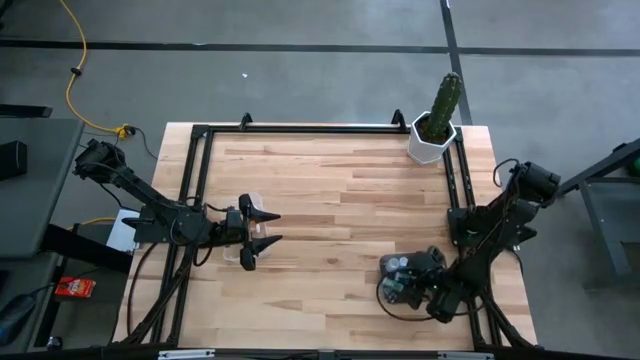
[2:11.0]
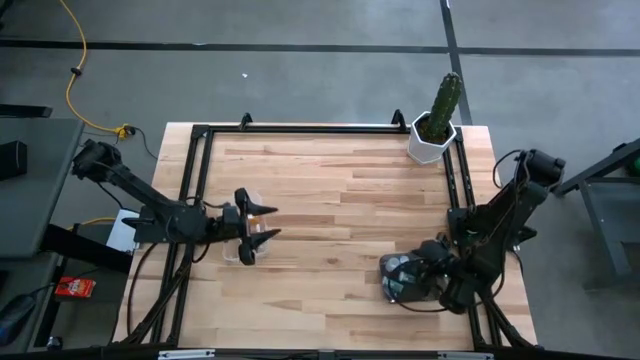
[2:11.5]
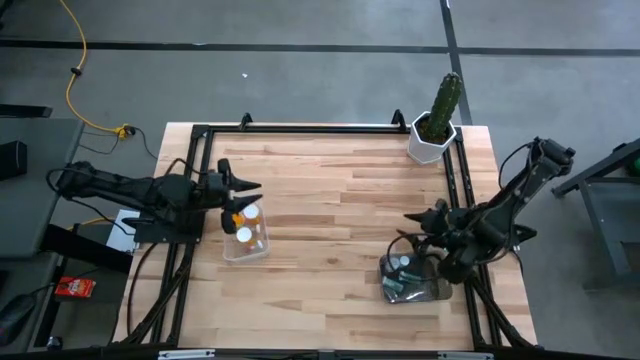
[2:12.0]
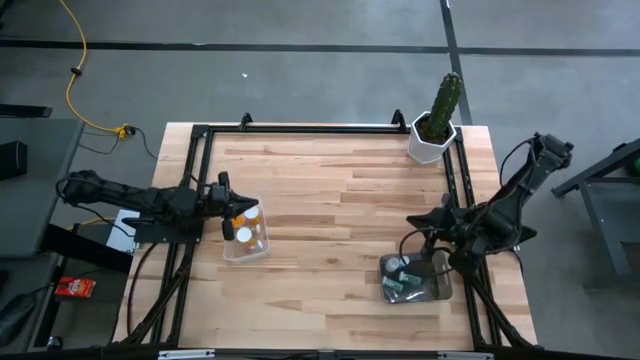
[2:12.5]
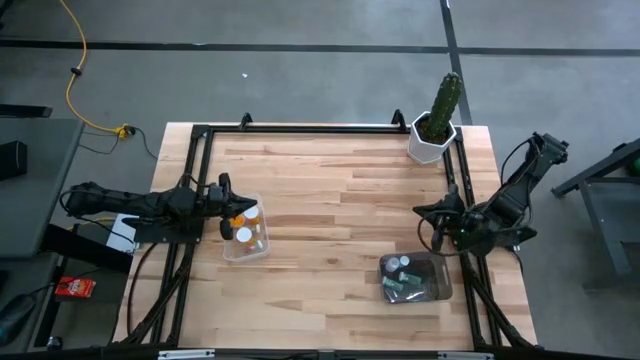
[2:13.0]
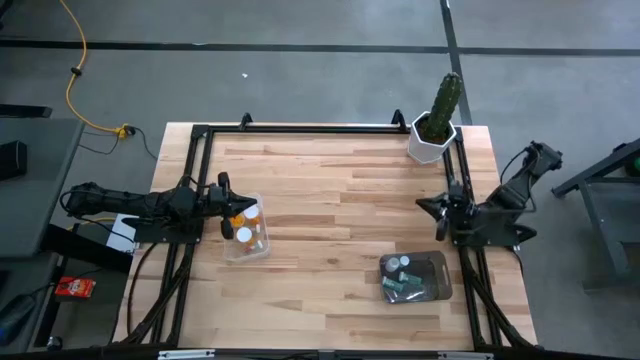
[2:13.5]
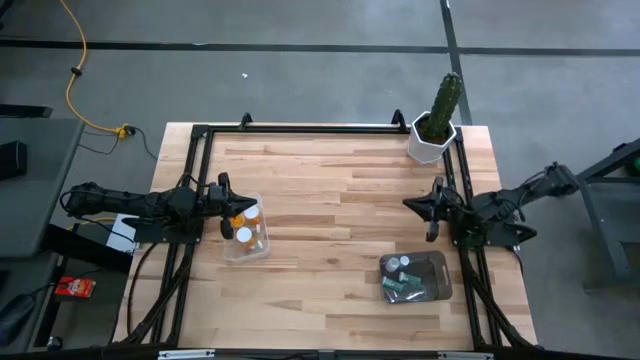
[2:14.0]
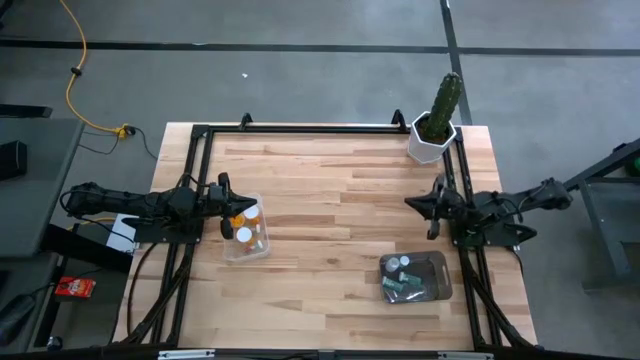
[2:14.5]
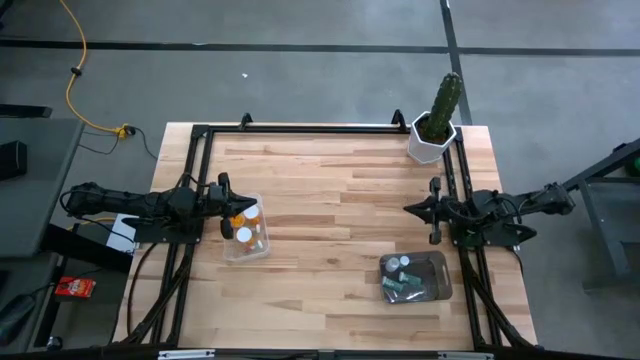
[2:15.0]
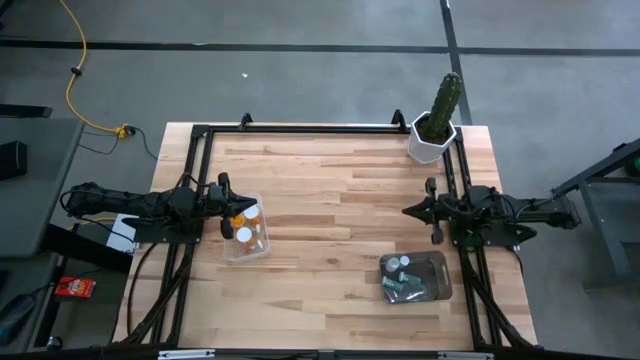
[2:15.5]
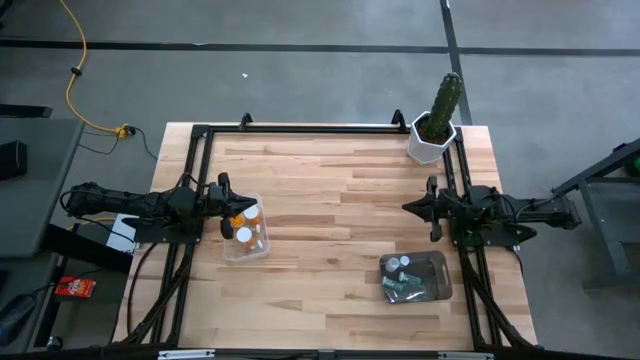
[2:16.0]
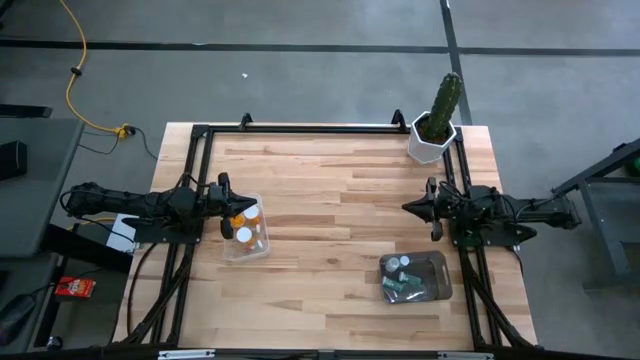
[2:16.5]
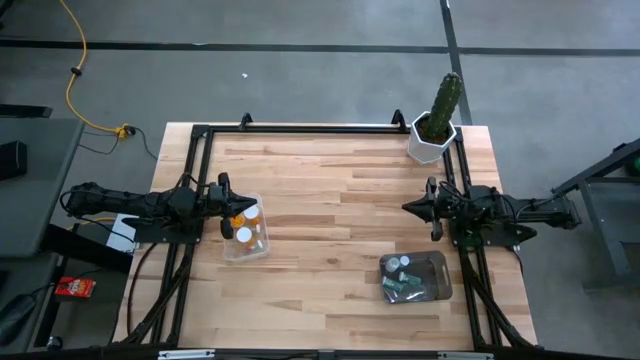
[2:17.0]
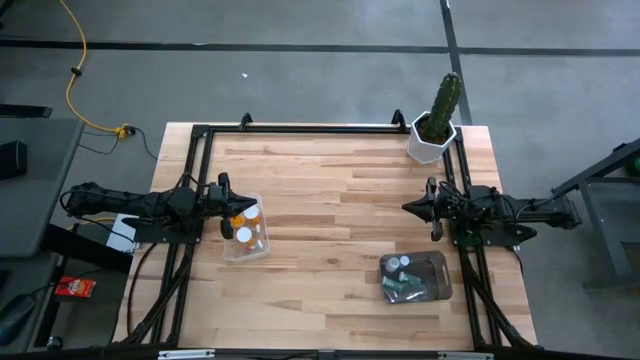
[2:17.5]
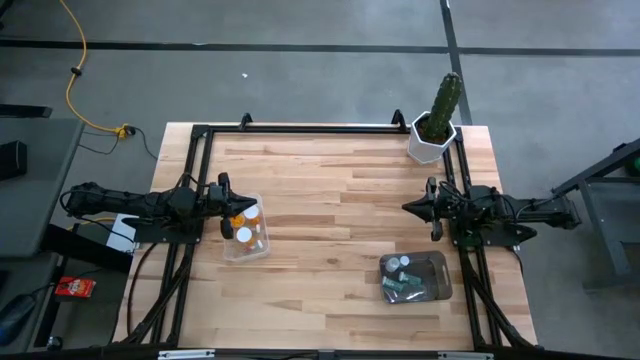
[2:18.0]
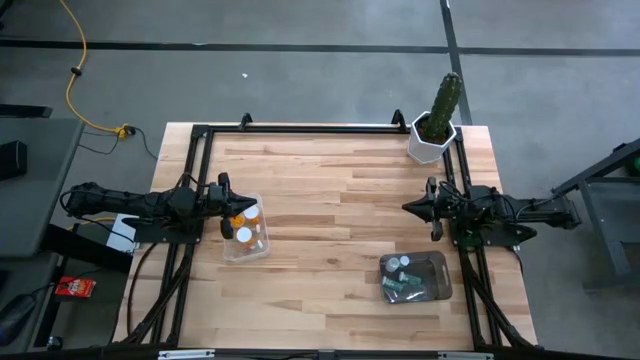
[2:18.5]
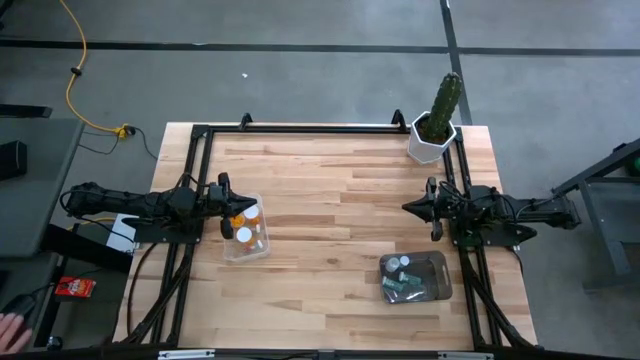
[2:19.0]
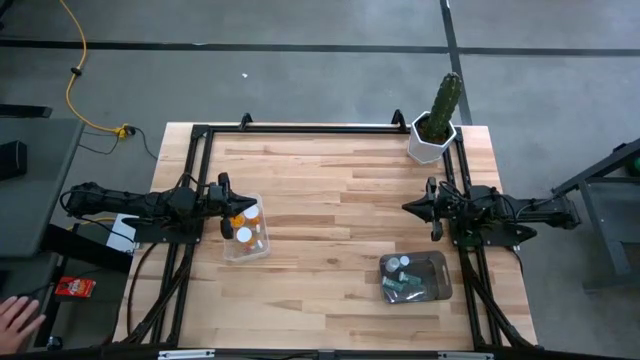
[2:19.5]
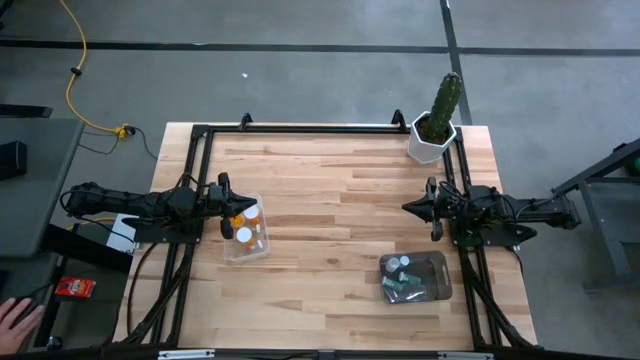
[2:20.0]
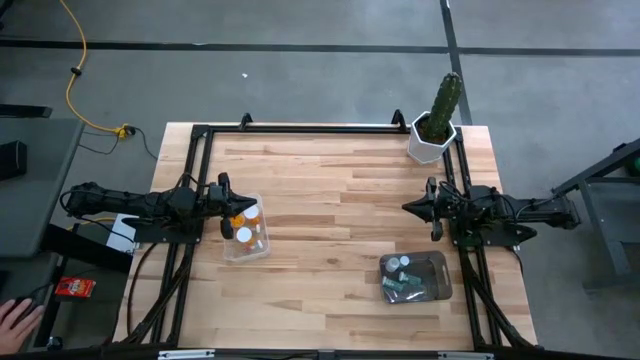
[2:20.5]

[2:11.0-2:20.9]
Task: Pick and place medicine bottles into bin by pill shape (circle, oval)
Return to Home Position

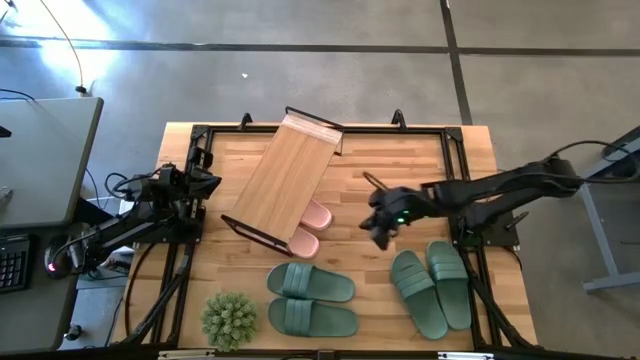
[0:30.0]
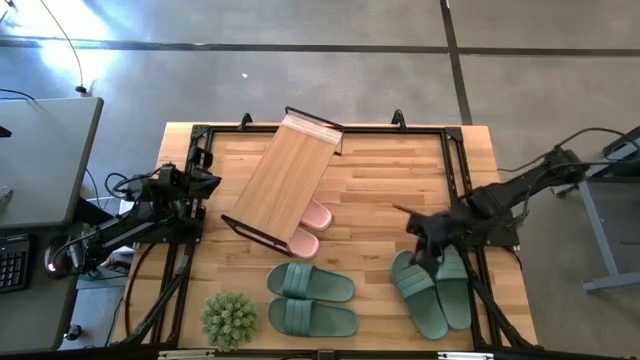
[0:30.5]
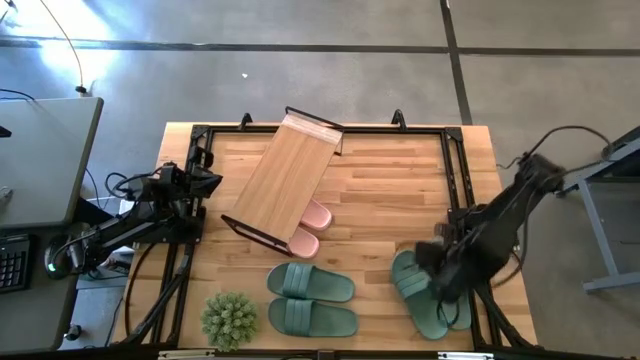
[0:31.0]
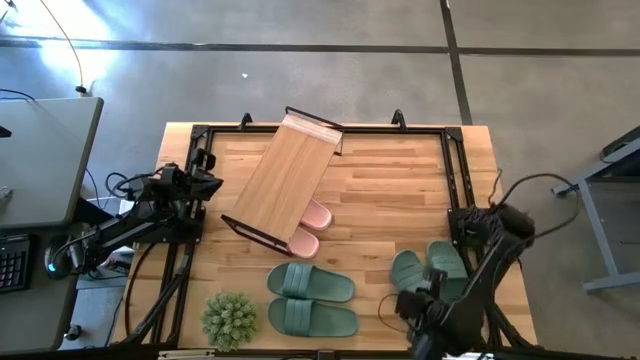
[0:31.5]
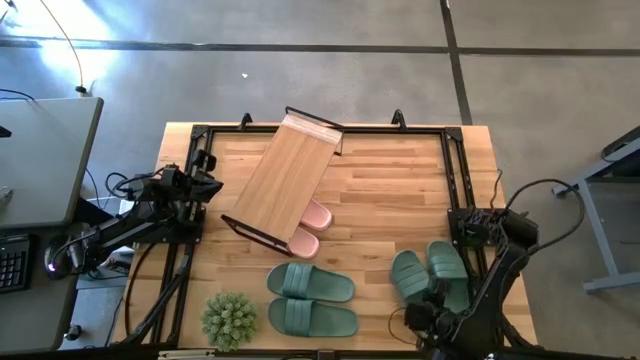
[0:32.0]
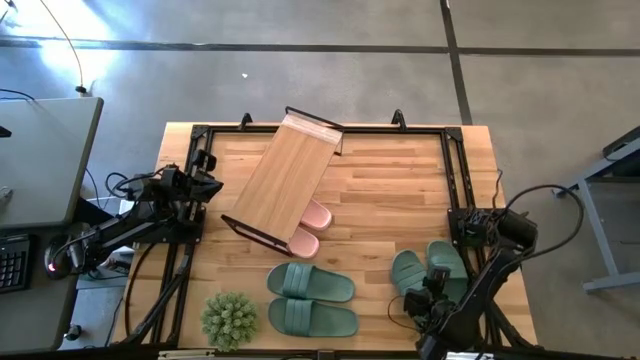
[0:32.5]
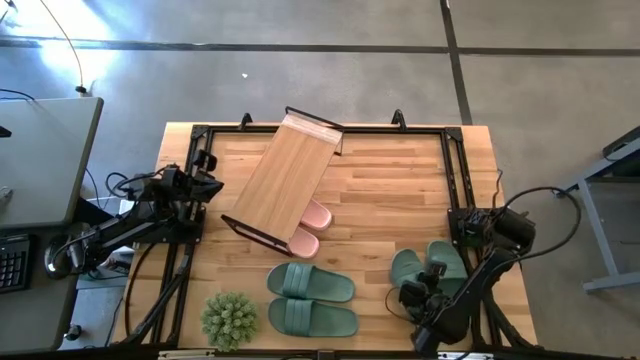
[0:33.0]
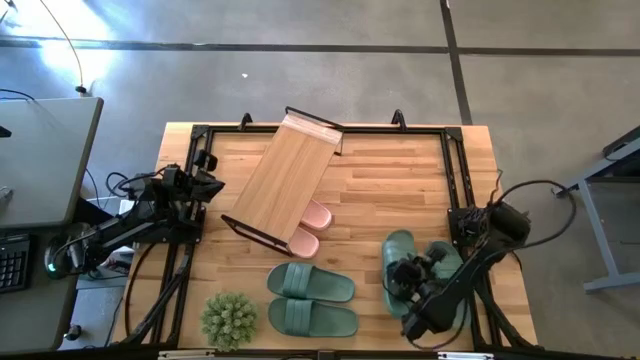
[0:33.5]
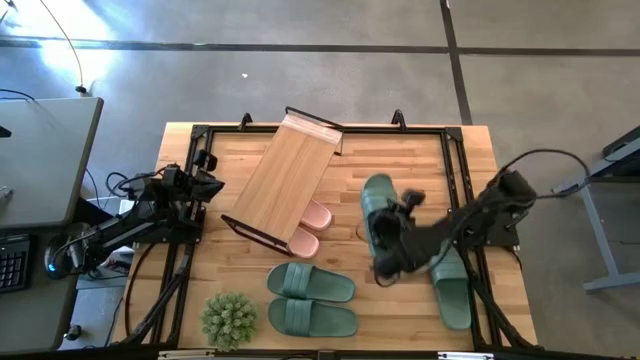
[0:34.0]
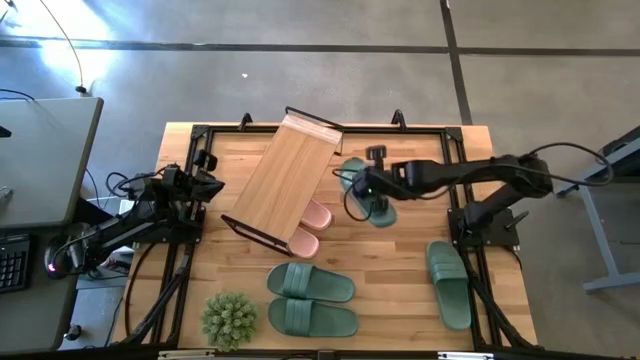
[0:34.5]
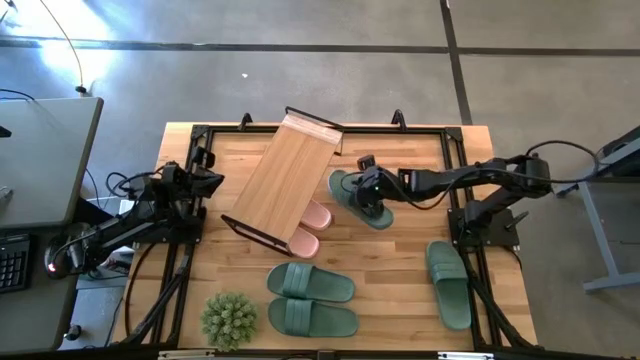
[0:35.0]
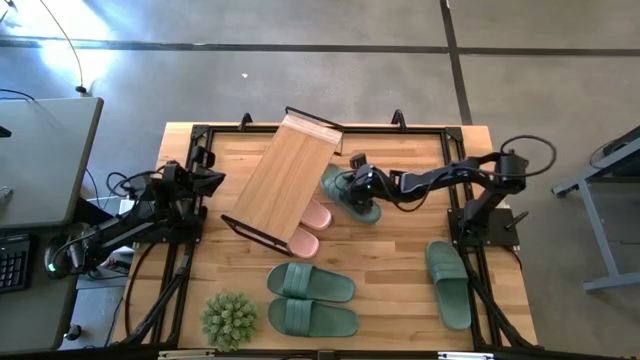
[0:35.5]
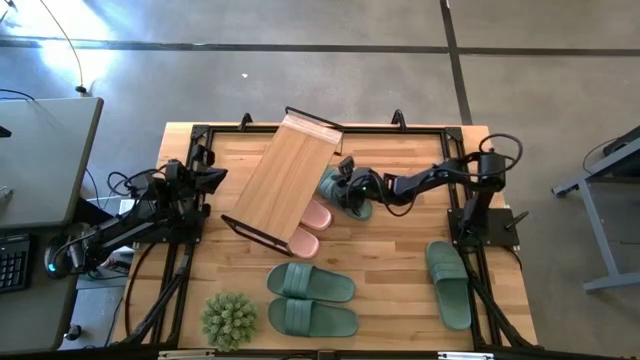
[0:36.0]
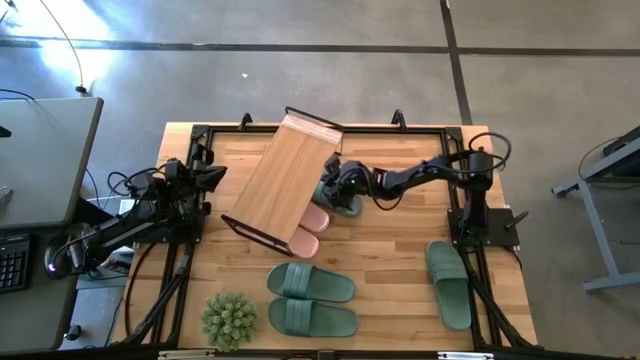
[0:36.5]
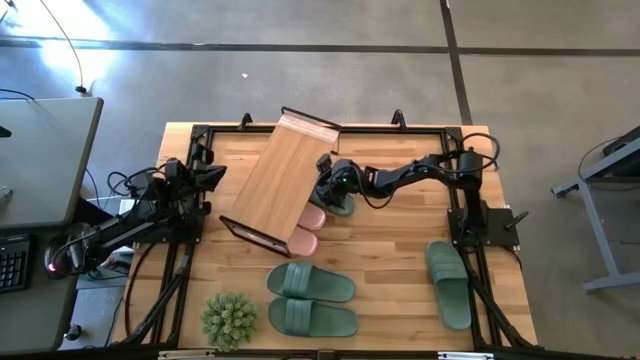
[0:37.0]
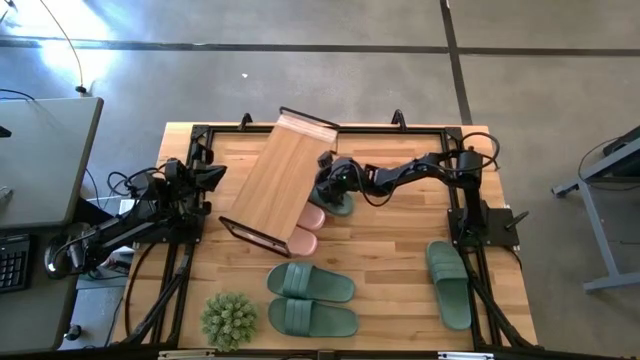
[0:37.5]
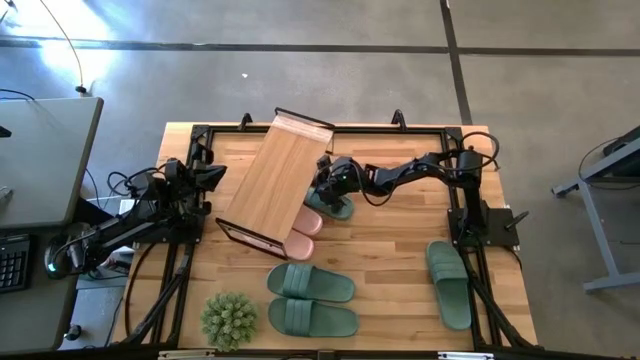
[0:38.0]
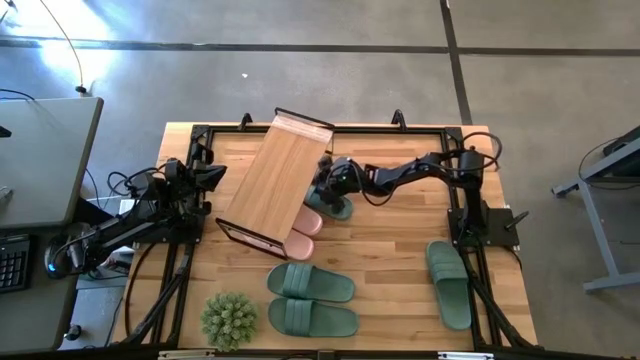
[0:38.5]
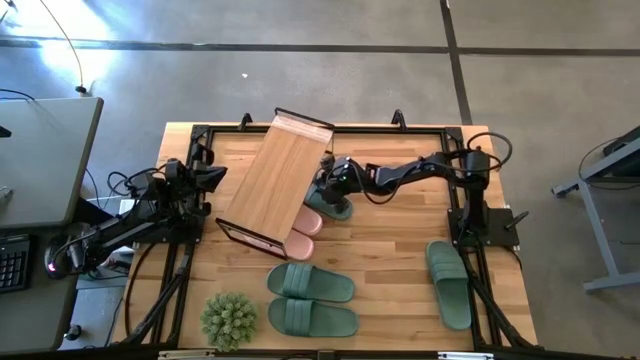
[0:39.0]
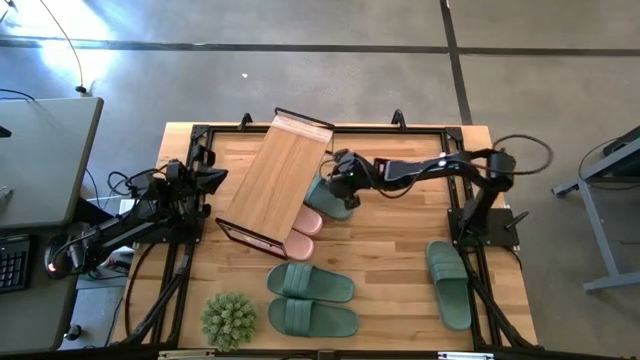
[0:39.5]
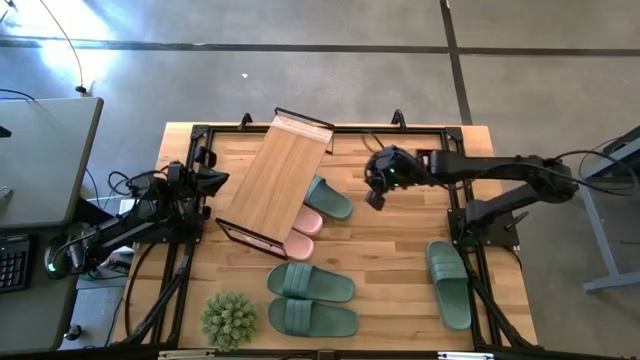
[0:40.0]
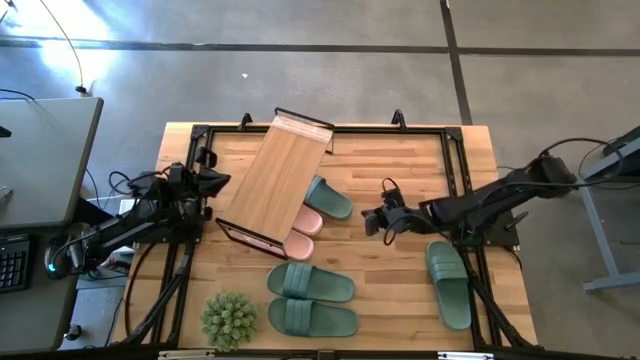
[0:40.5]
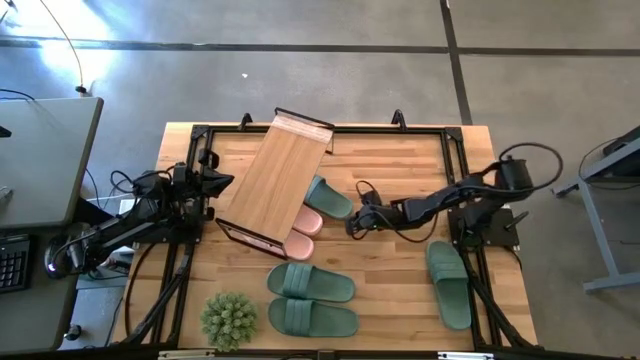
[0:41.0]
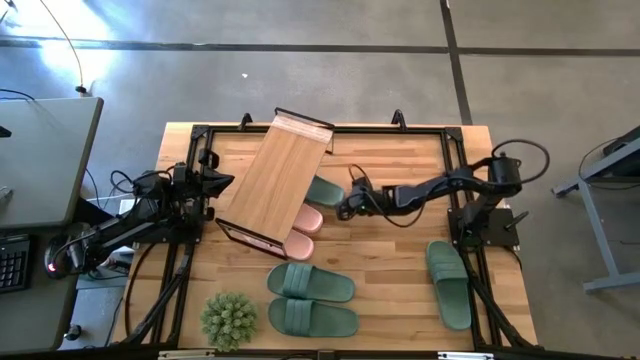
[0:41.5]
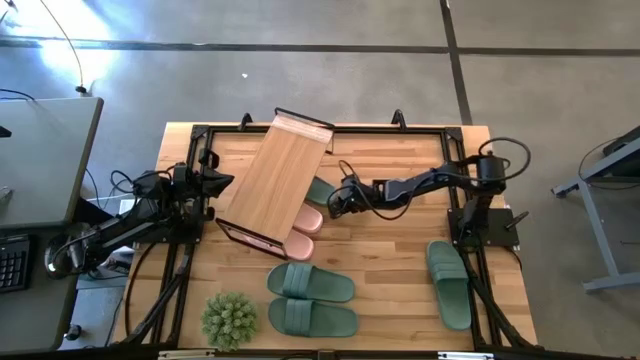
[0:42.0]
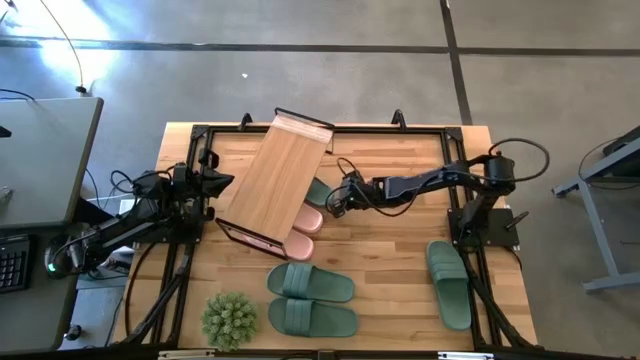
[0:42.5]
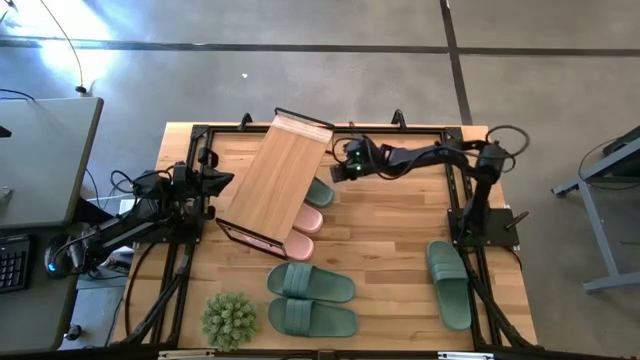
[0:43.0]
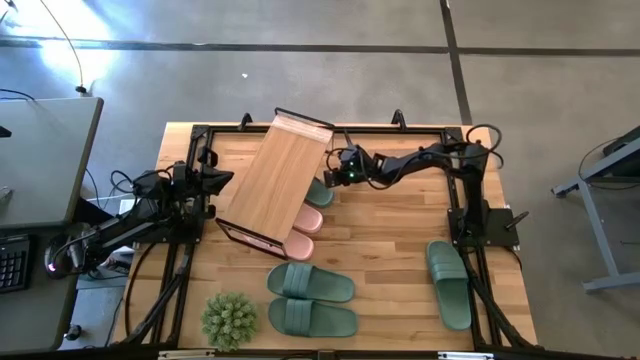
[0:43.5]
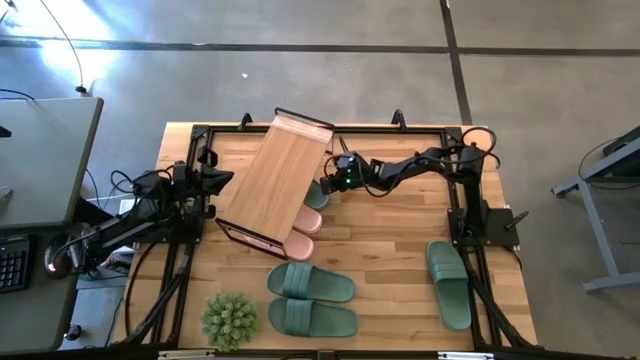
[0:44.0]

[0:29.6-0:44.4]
Task: Pick and place slides into the shelf
Put the green slide under the shelf
